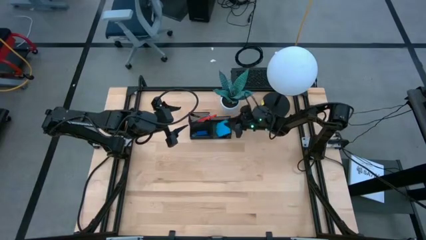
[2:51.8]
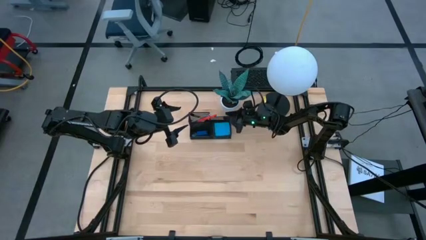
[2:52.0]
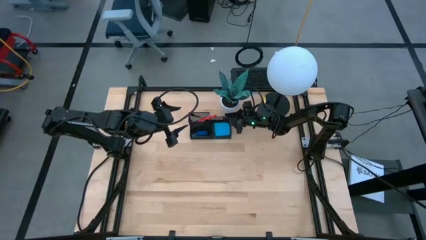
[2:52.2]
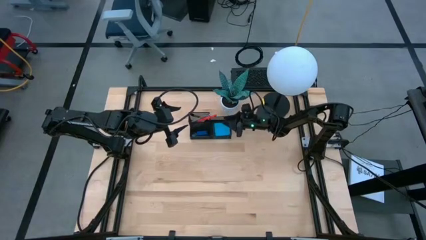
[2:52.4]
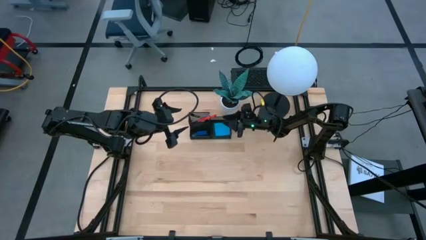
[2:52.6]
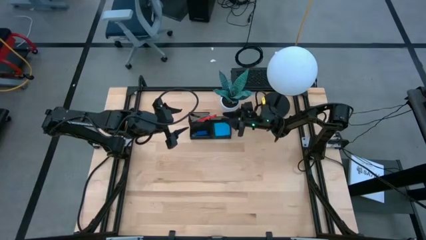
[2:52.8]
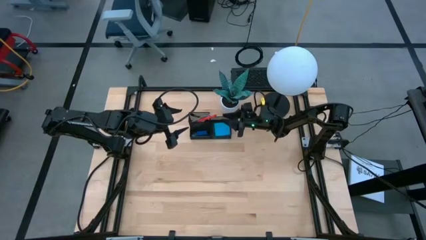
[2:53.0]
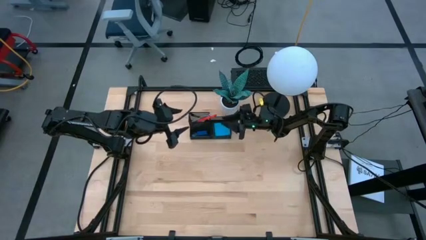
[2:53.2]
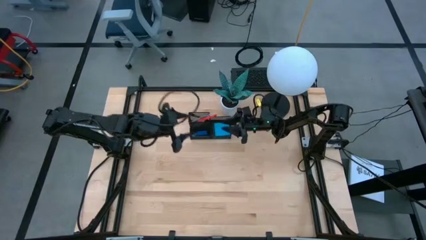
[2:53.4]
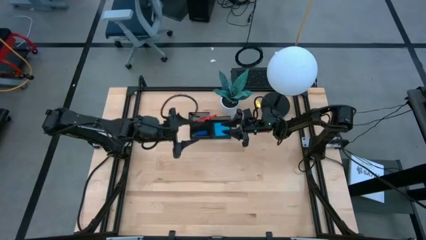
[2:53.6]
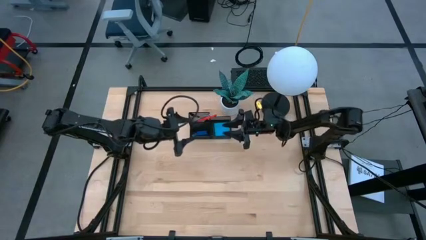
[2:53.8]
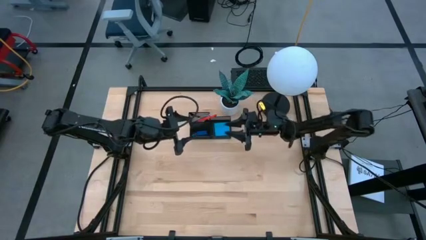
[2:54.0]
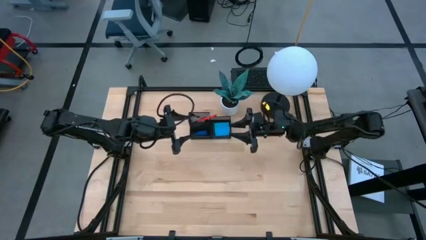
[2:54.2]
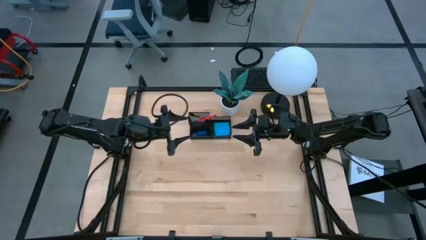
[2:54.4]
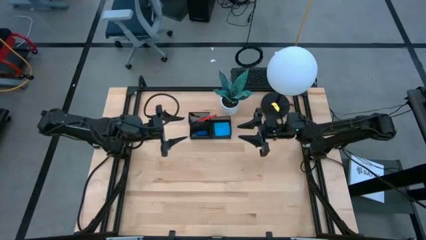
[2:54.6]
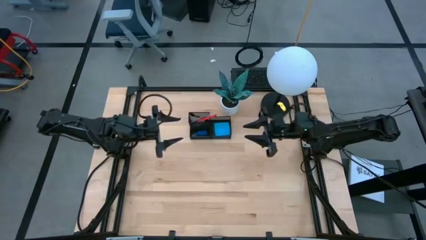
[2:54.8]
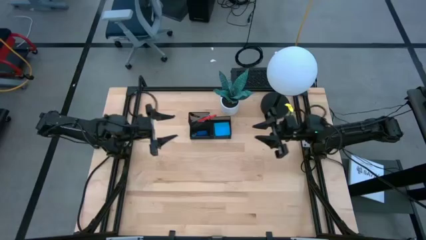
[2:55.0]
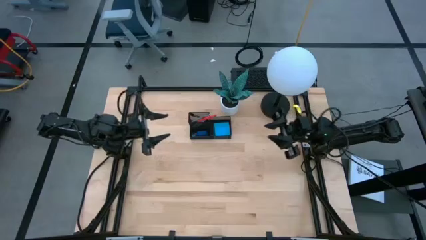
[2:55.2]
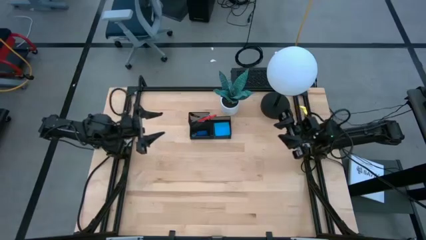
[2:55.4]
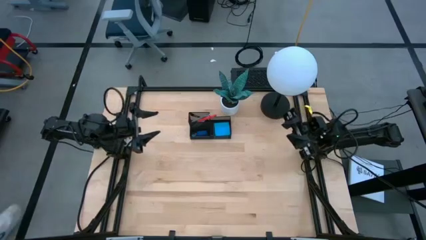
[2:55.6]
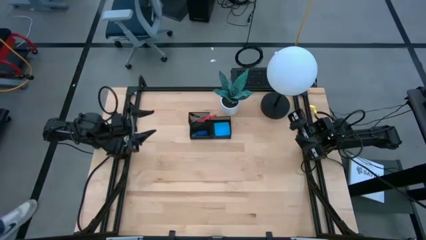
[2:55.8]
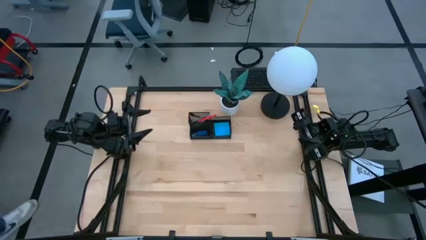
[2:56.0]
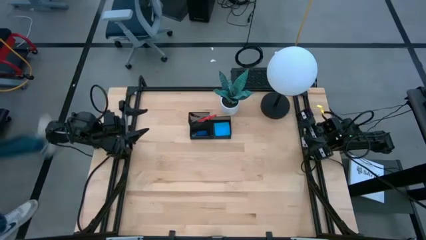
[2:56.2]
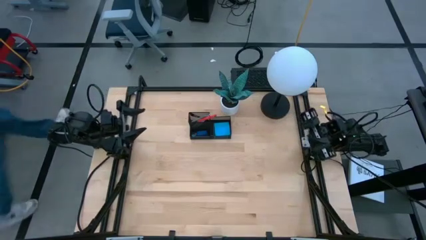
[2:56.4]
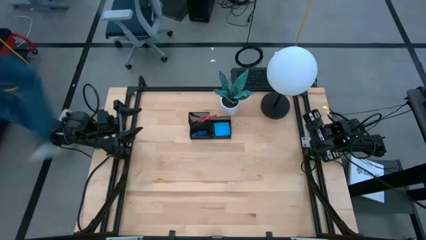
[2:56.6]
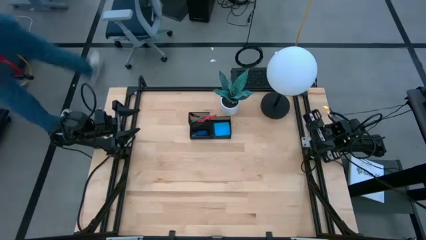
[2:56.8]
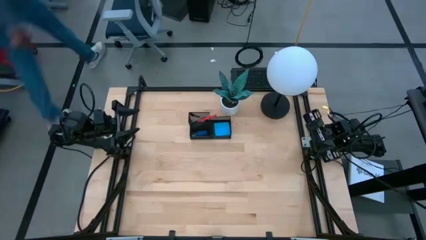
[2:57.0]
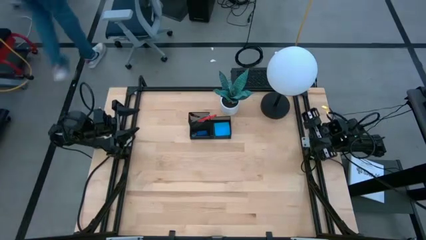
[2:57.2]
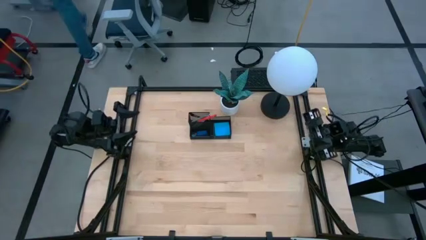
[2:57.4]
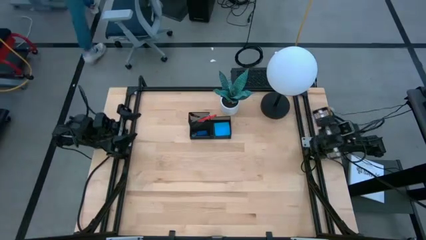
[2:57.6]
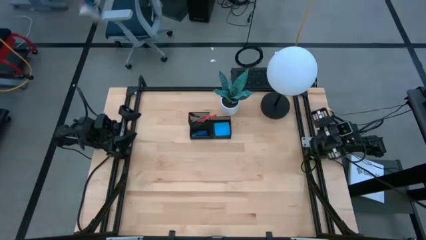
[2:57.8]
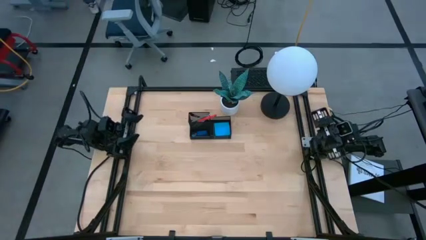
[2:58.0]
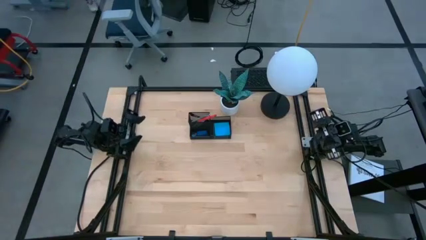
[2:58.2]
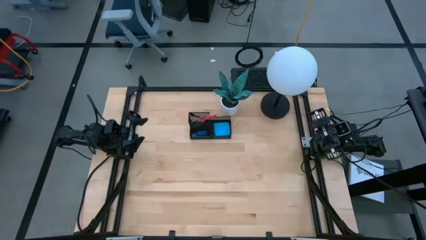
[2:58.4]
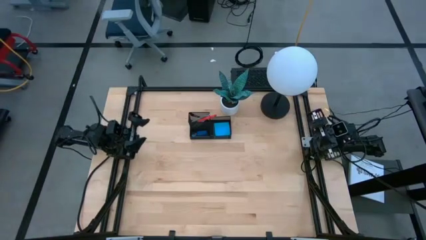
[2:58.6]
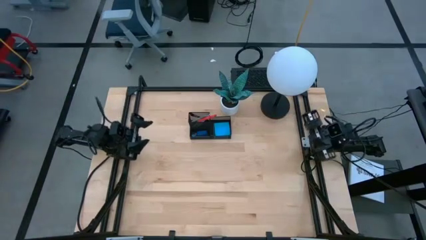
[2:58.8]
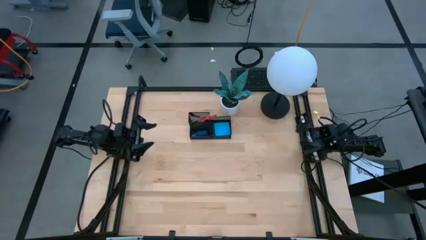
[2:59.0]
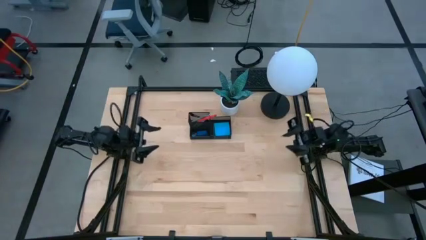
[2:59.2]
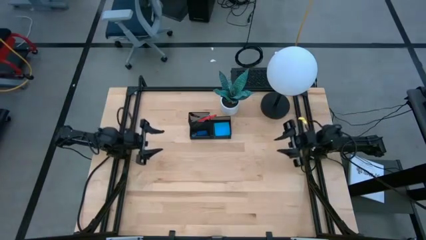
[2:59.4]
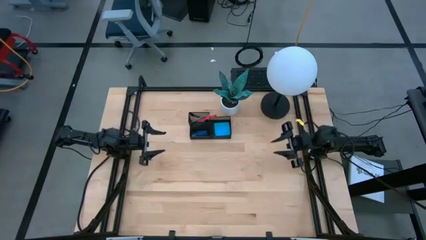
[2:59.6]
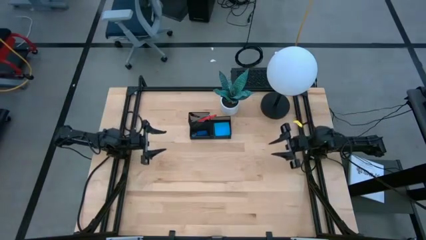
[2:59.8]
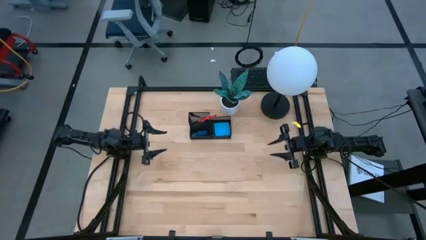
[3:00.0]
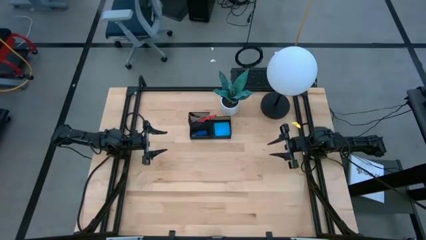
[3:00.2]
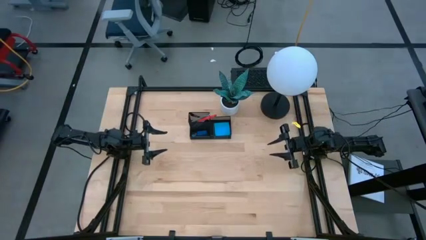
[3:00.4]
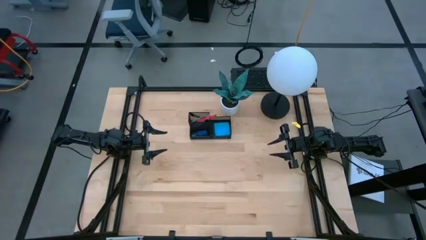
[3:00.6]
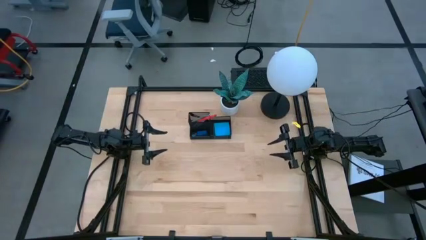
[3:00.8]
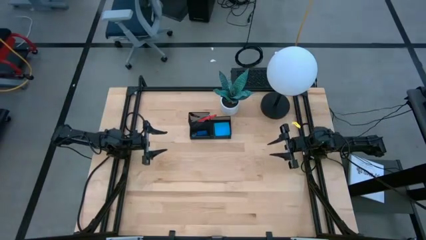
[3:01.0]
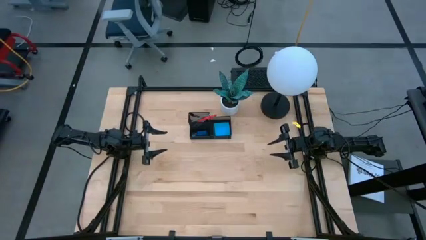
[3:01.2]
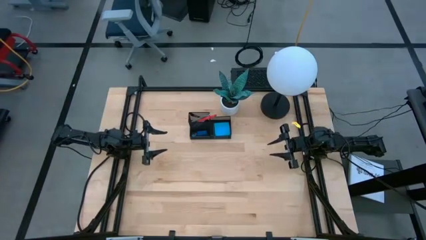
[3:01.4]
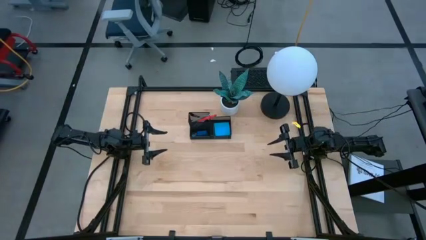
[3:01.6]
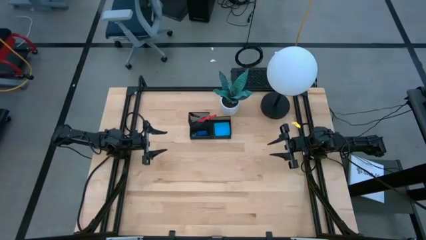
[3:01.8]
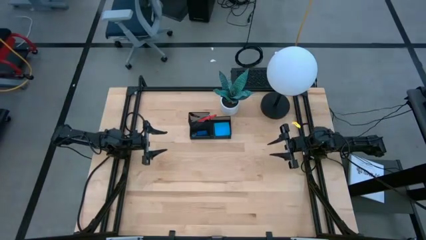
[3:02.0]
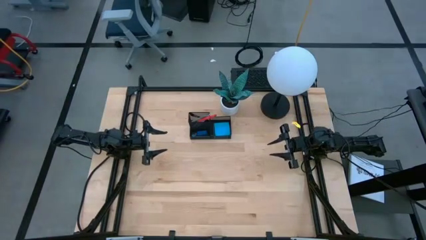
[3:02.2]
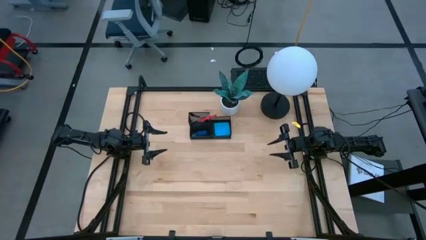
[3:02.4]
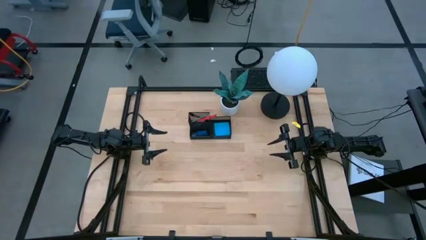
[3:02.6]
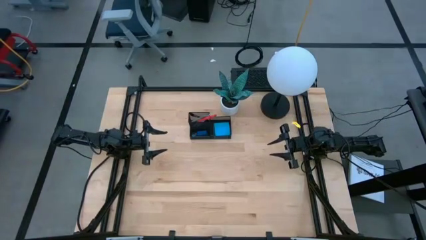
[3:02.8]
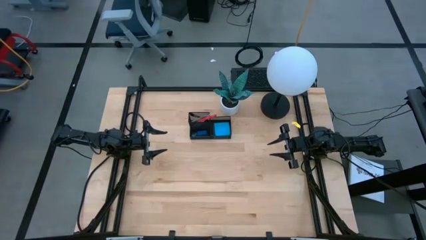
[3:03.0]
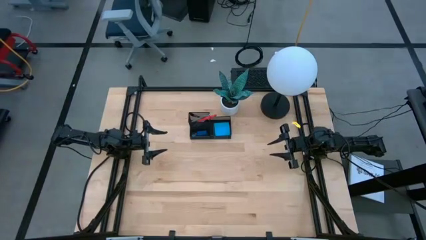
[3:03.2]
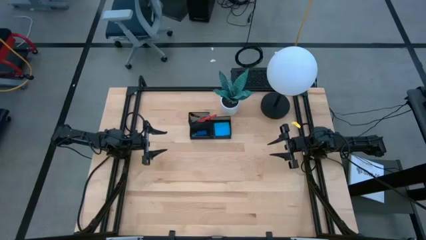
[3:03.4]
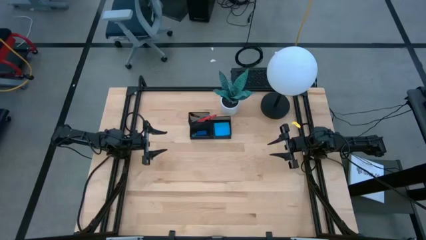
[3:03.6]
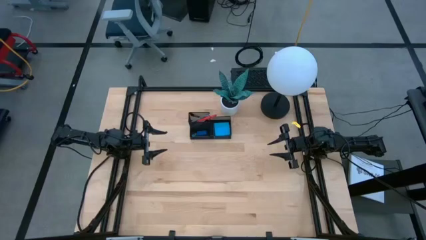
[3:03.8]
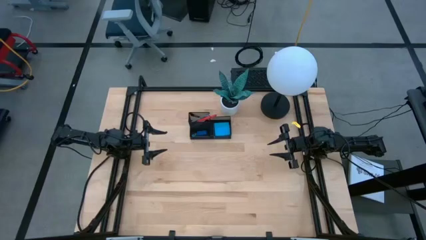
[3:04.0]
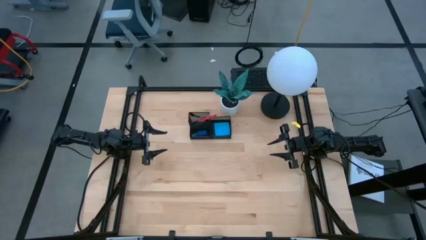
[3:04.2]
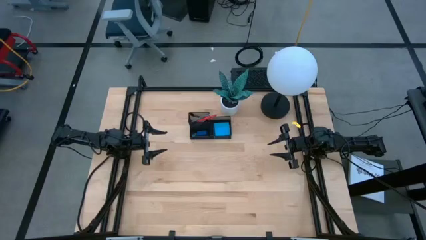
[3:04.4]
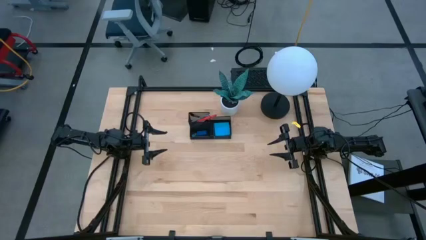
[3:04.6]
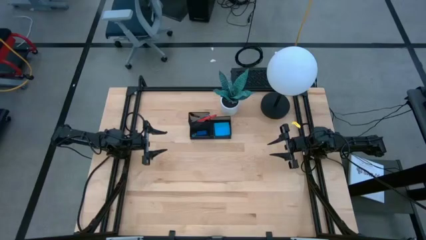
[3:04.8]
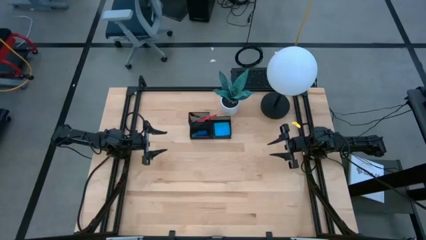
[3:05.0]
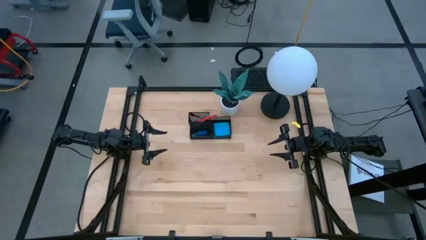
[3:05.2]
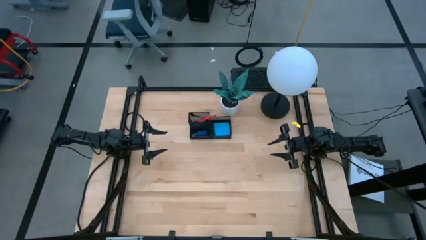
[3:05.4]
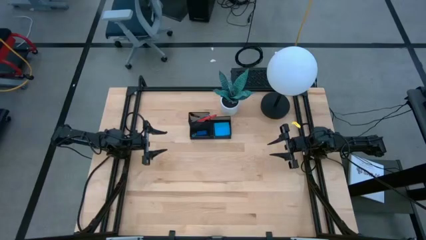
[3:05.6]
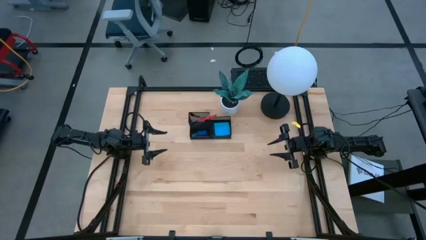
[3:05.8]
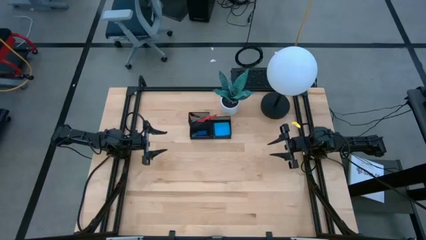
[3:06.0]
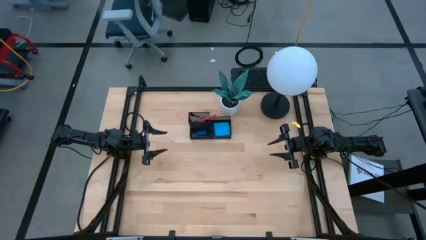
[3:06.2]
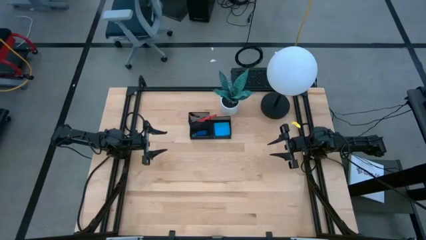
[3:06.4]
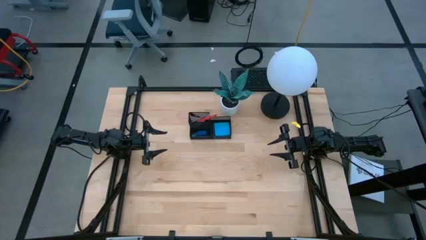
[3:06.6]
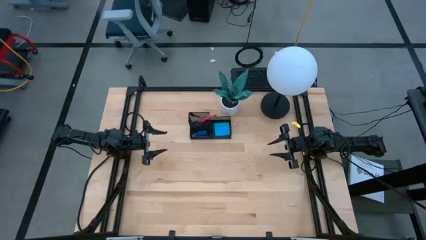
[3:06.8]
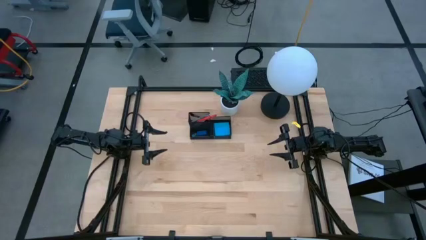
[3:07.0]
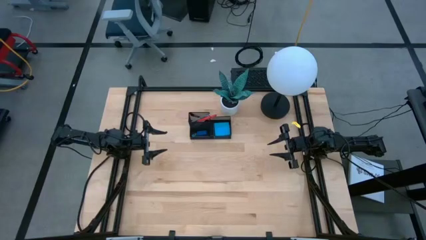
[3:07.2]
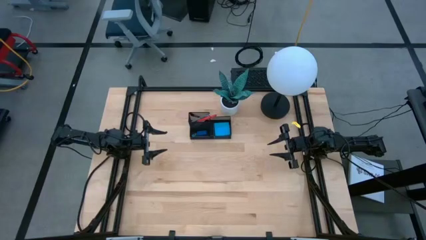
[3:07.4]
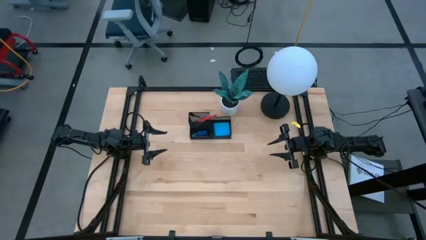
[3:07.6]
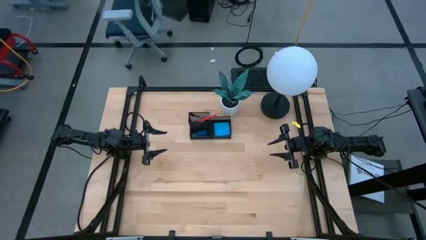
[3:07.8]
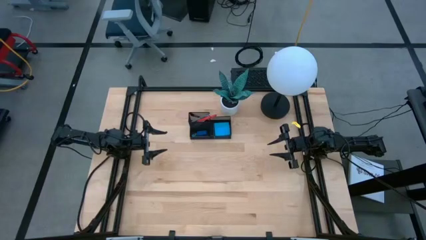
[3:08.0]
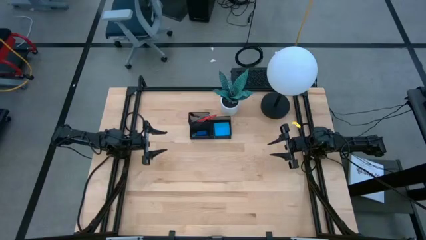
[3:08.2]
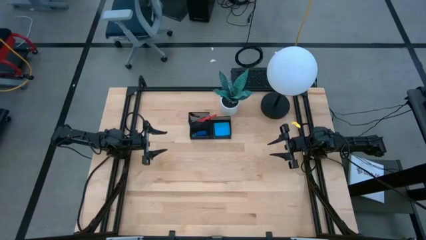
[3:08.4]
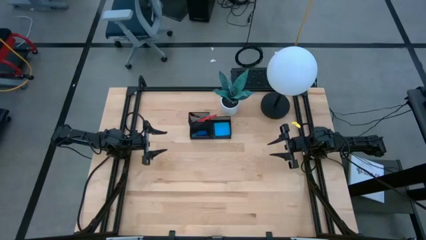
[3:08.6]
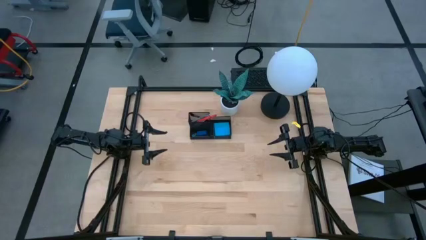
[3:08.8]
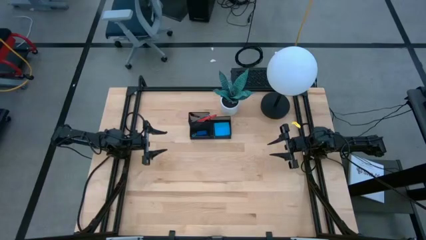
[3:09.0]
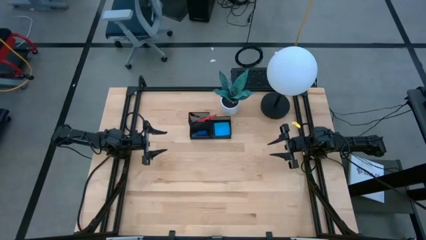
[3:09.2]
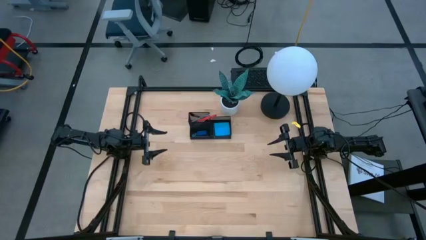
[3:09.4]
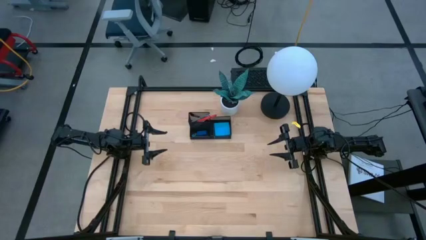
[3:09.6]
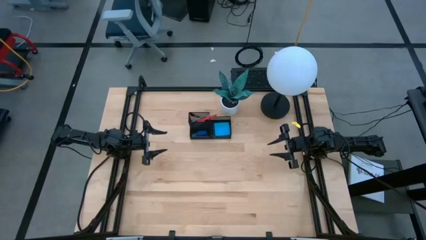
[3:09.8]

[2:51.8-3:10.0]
Task: Pick and place office supplies into organizer
Return to Home Position
